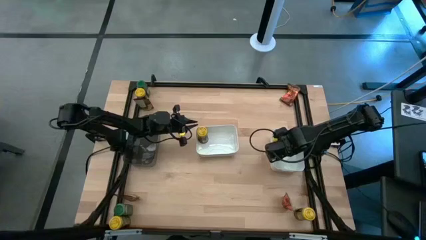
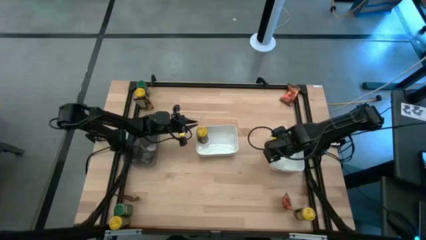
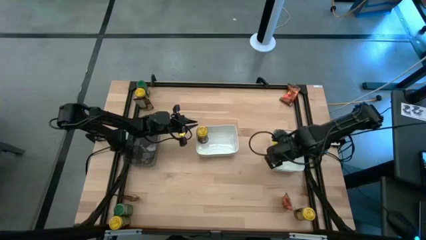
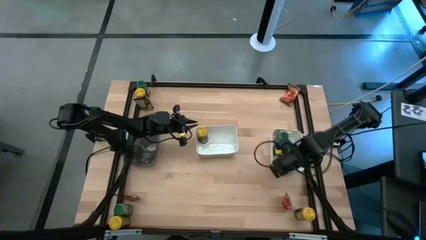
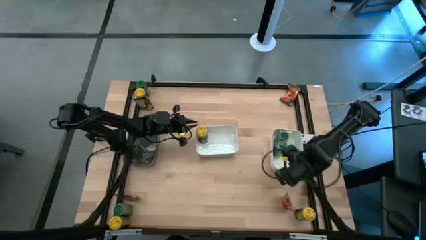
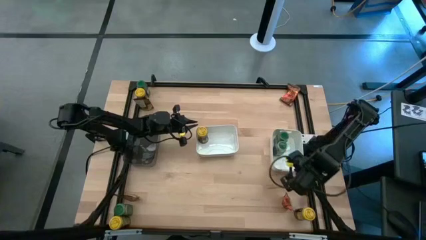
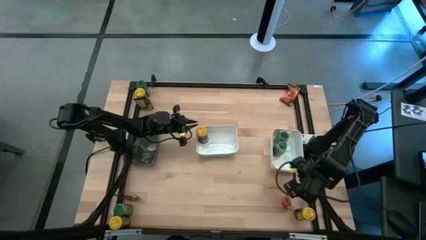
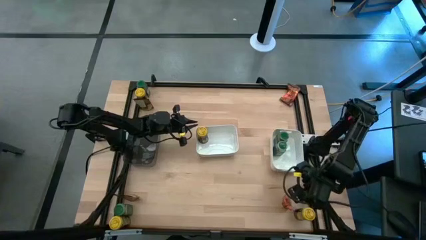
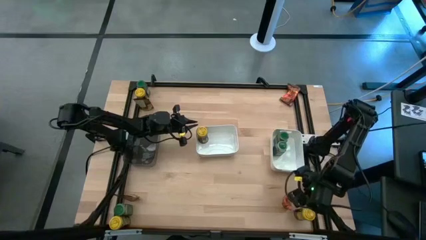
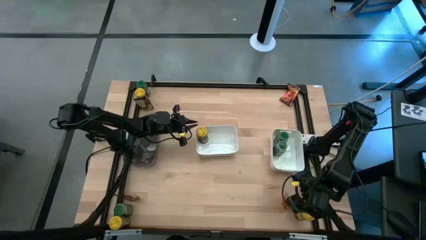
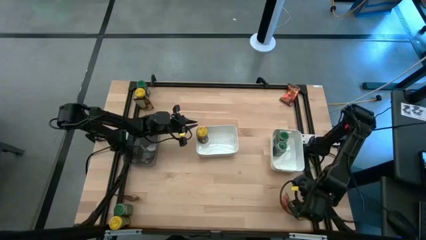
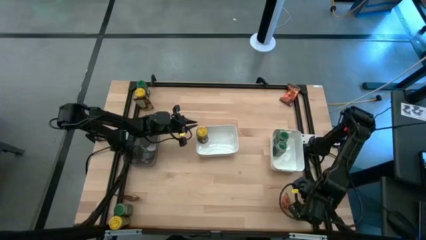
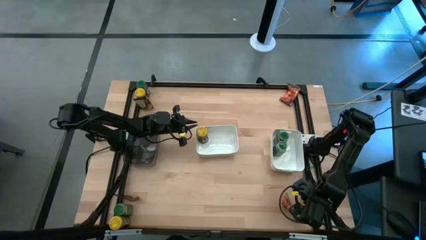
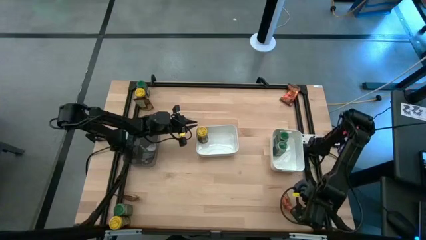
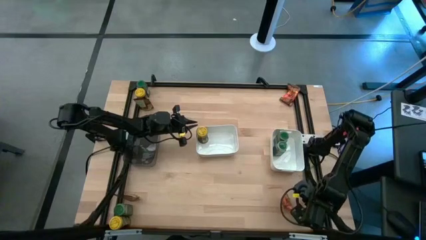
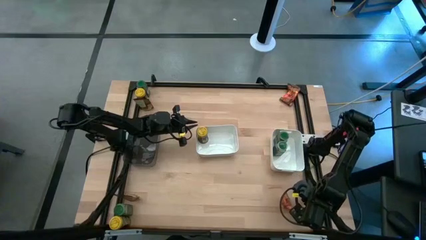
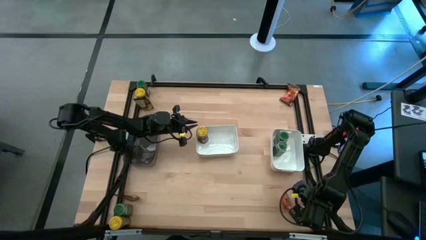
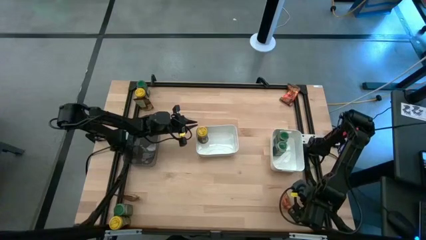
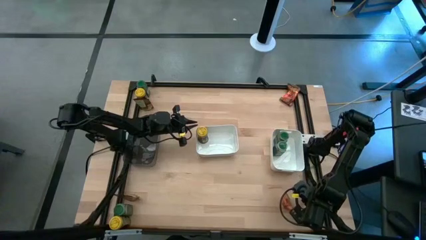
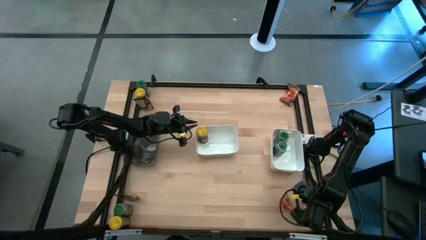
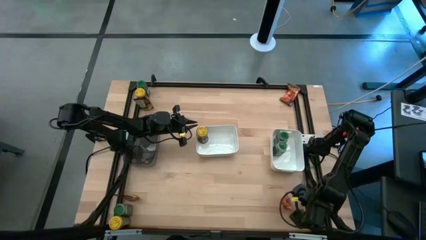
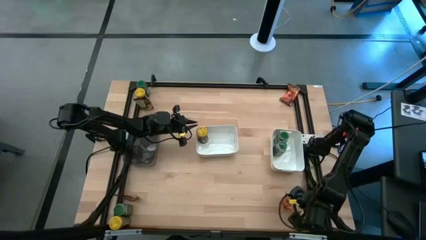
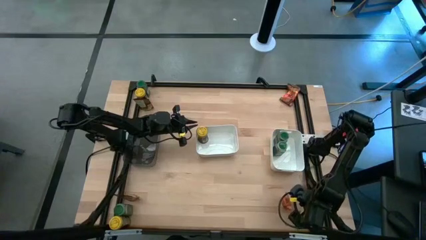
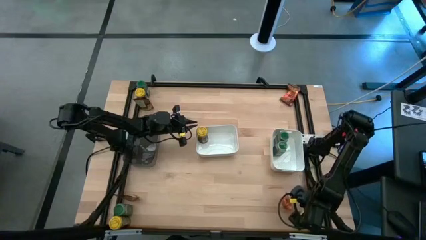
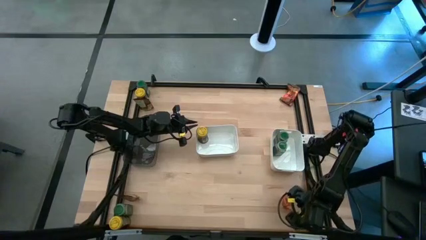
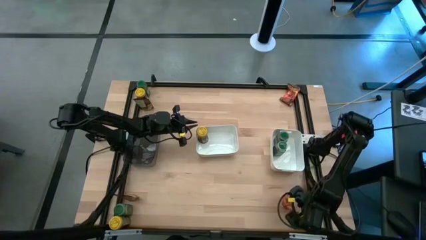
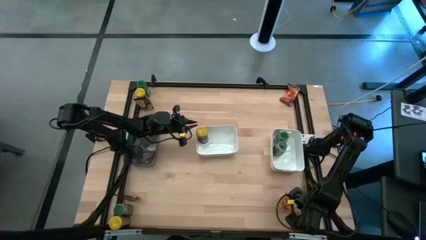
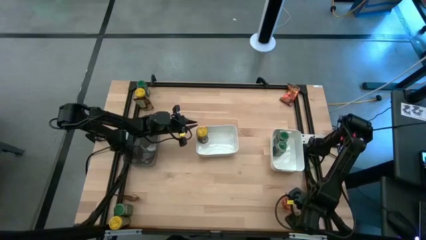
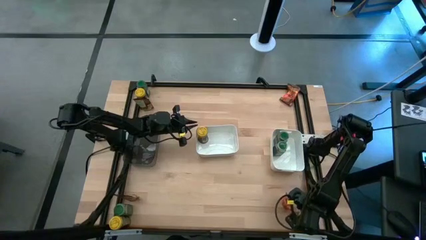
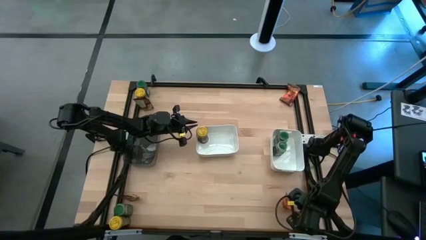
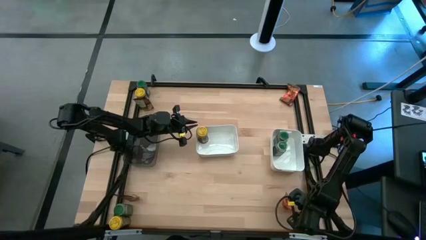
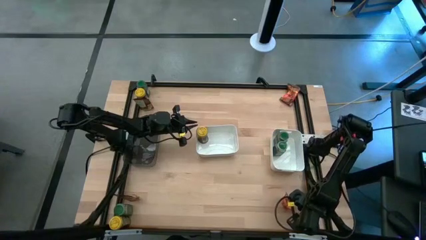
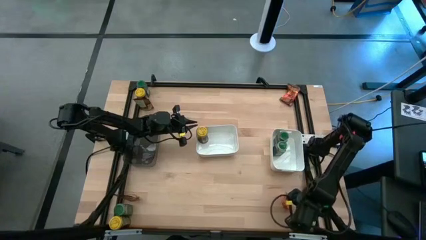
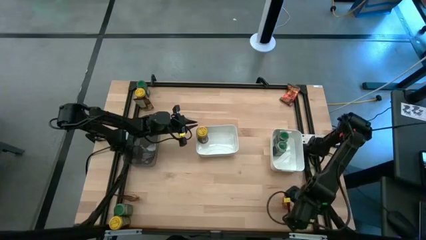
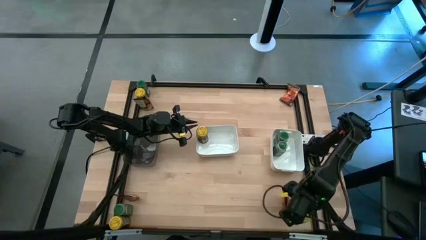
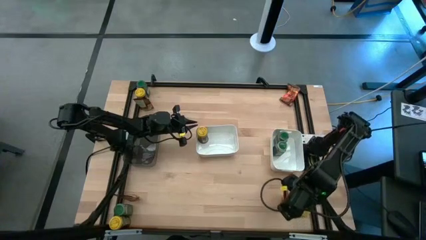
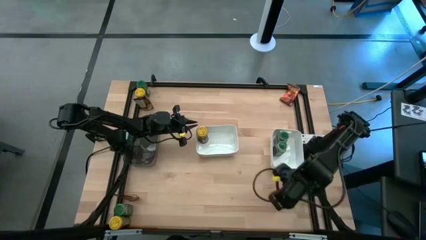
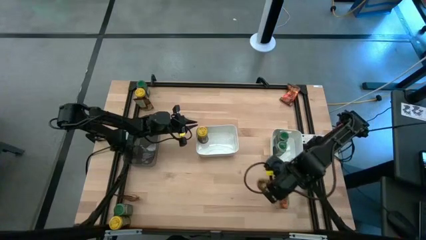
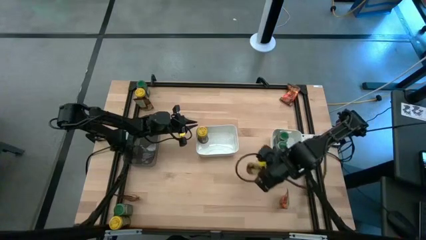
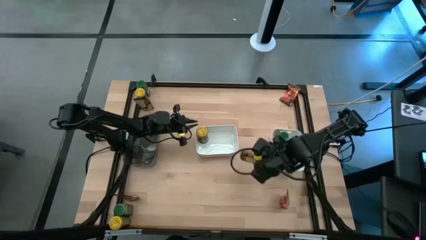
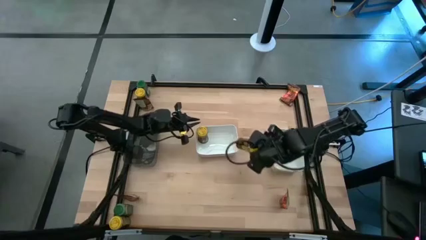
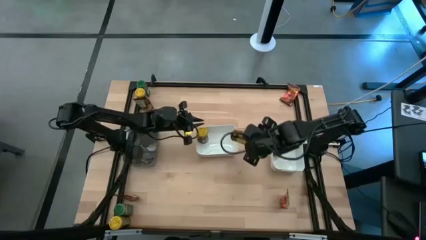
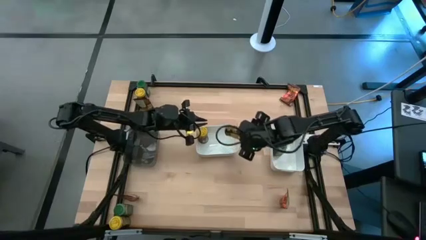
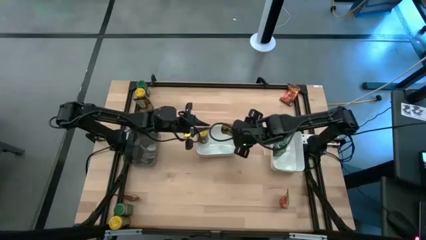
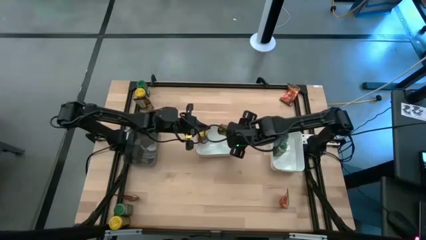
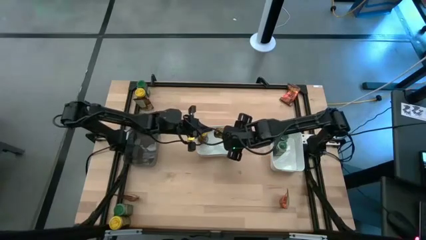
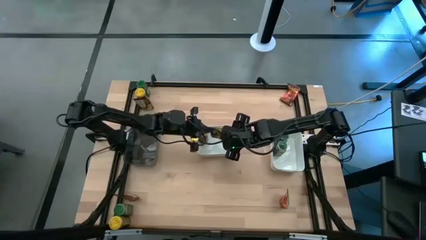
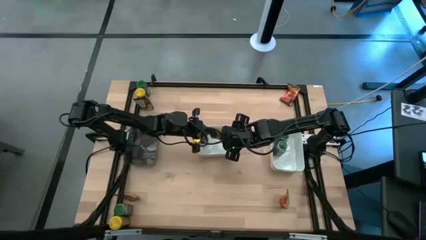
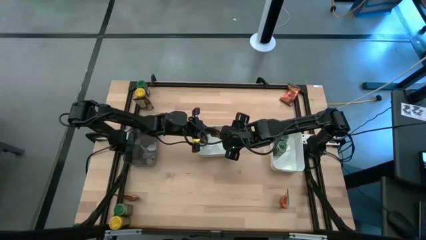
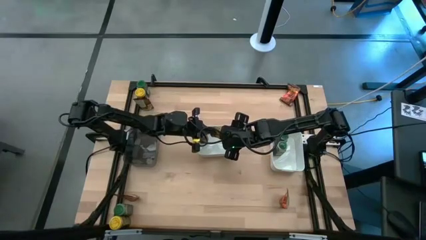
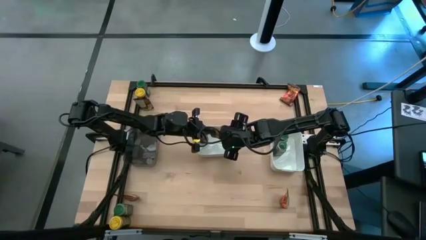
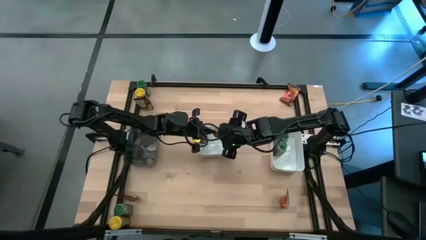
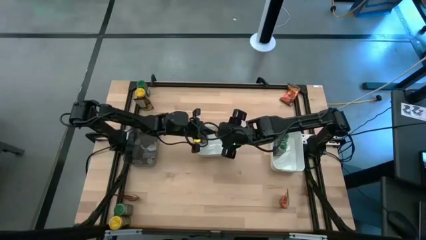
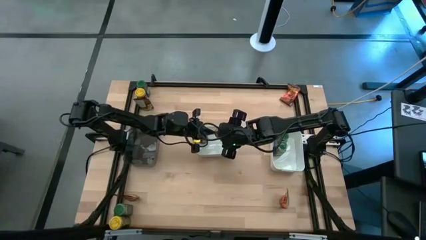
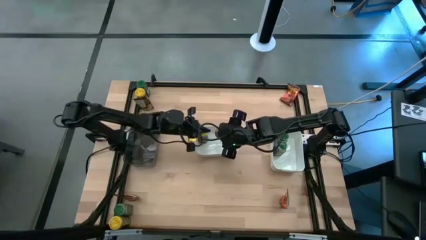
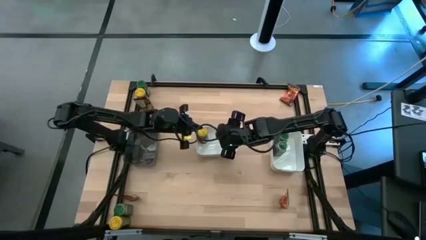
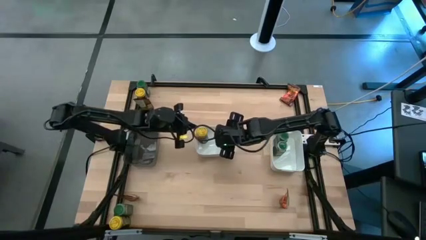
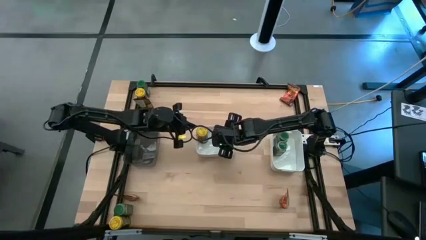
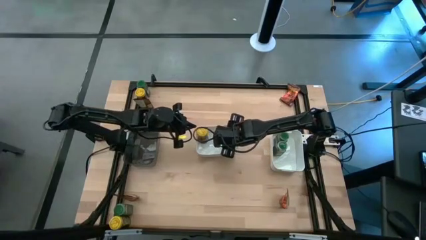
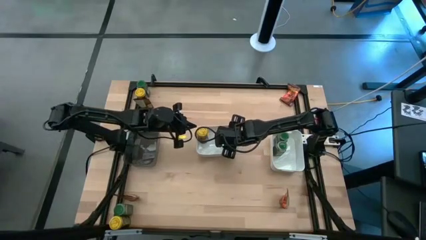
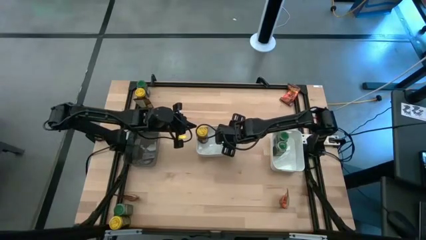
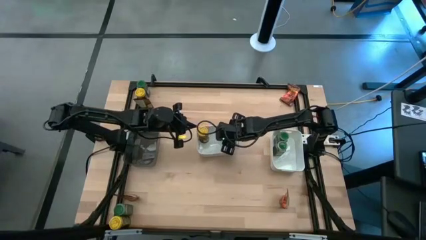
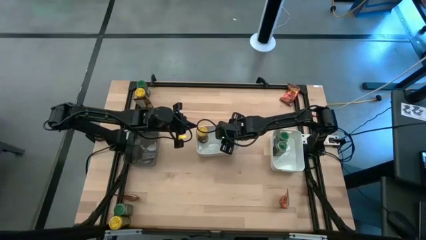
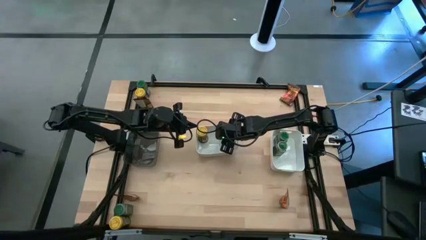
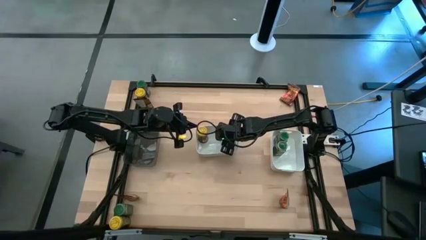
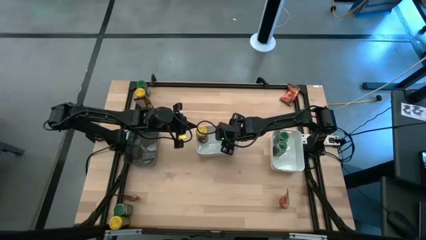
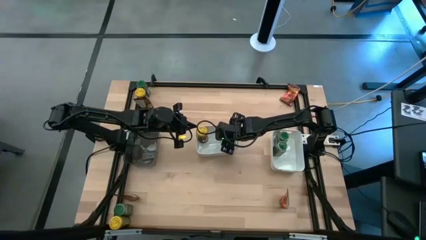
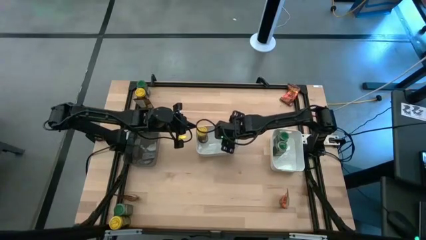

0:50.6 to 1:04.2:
Task: Sort spices by type
Put the bottom right yellow seasoning bottle into the left white bin

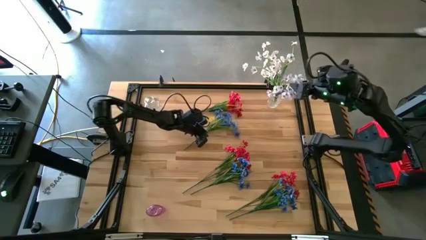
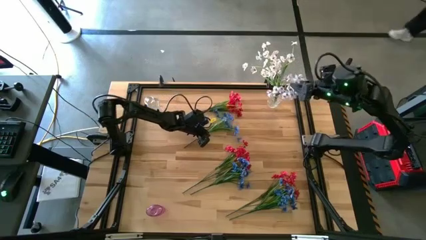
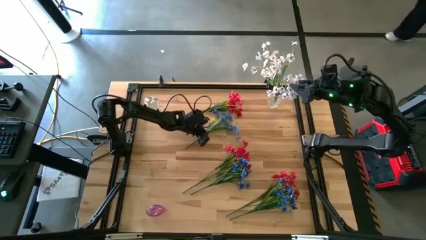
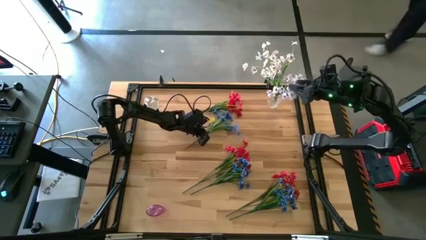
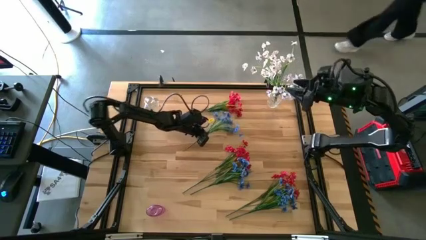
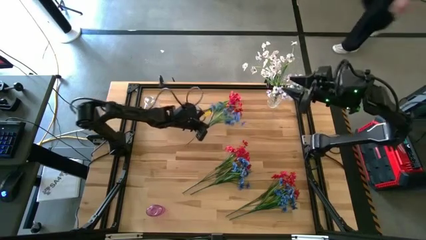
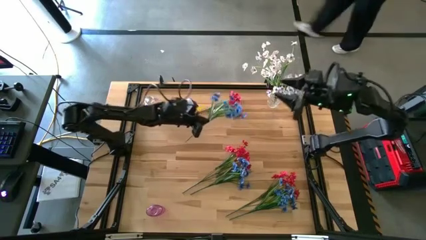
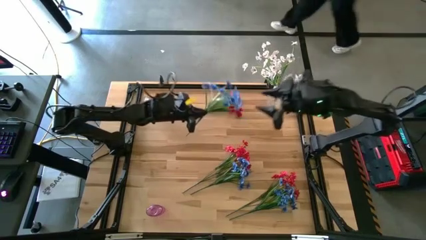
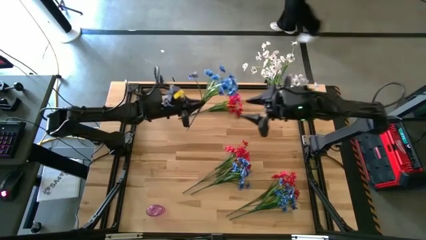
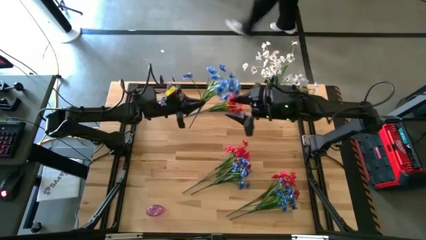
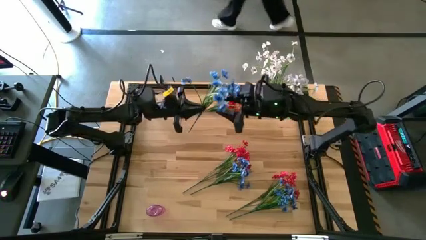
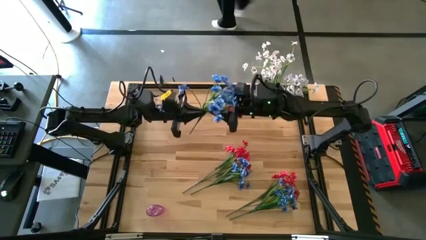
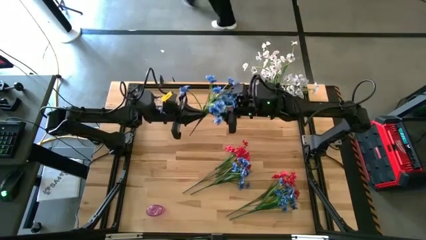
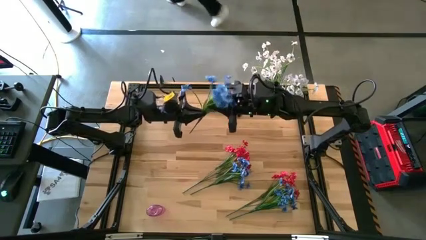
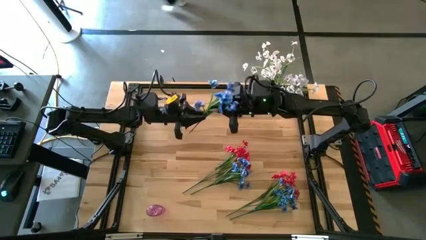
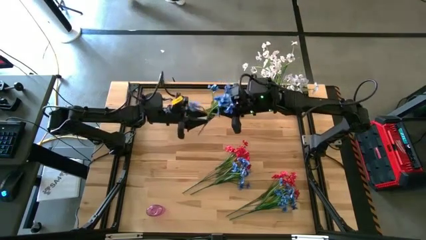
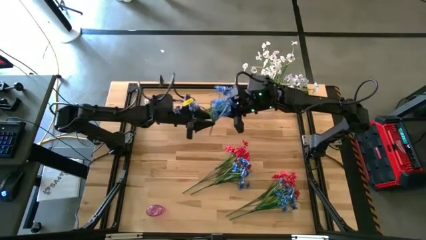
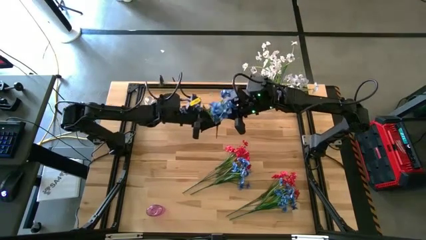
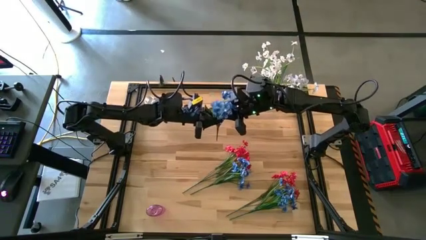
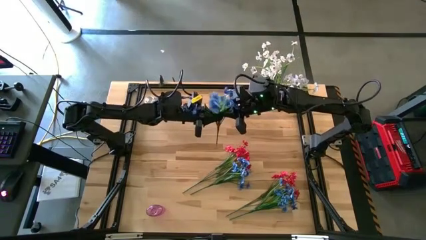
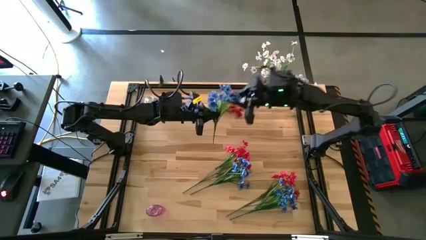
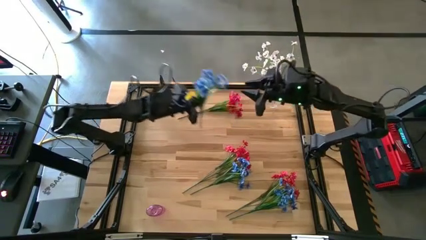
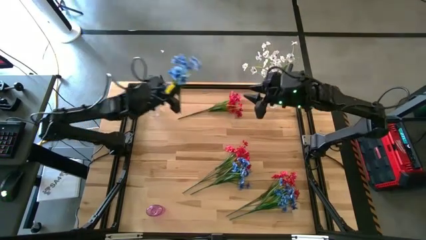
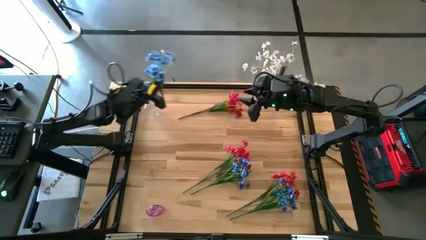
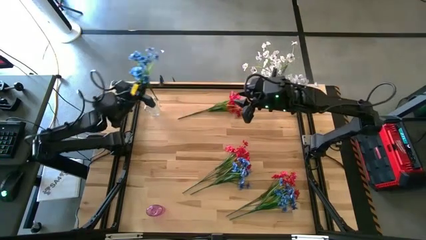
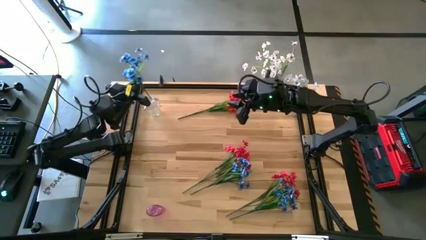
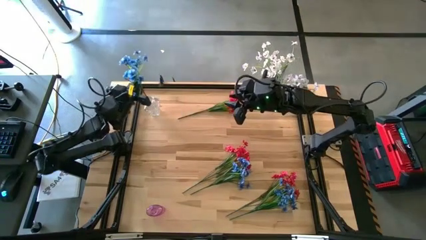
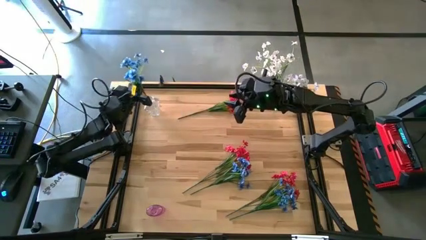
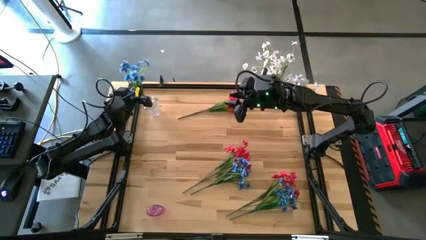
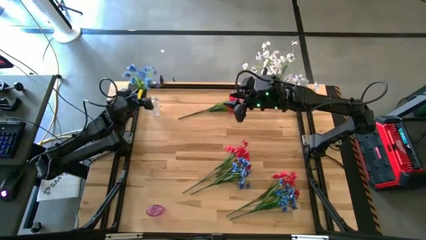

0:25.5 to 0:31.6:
Task: Sort flowers into vase by color
Put the top blue flowers into the left transparent vase
